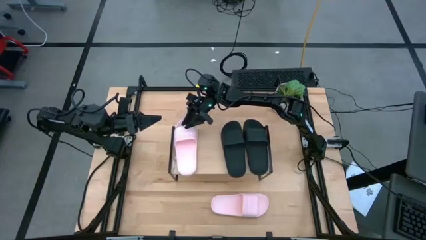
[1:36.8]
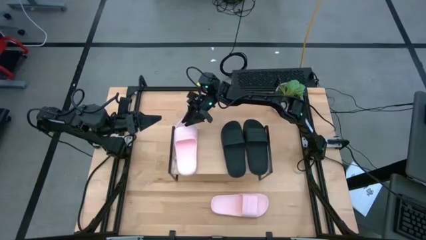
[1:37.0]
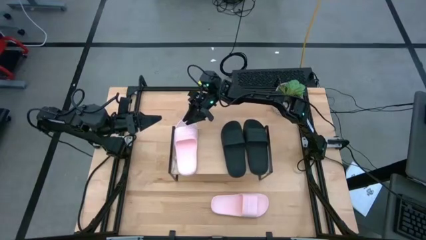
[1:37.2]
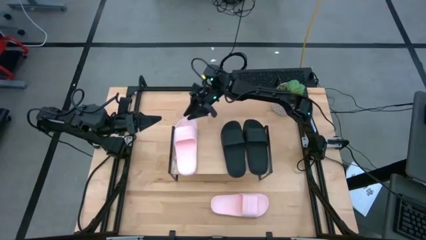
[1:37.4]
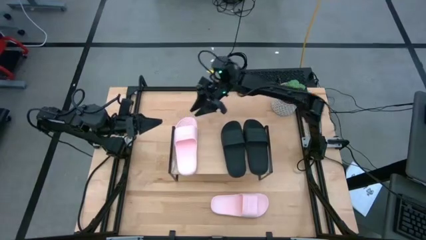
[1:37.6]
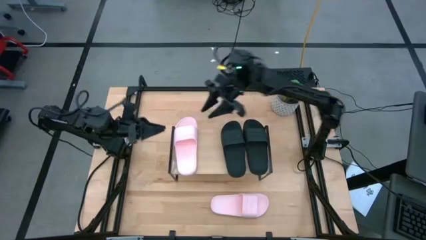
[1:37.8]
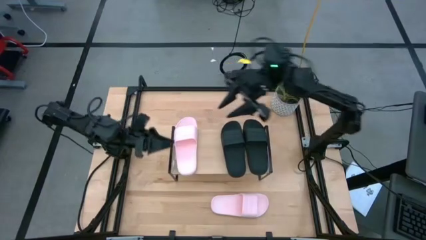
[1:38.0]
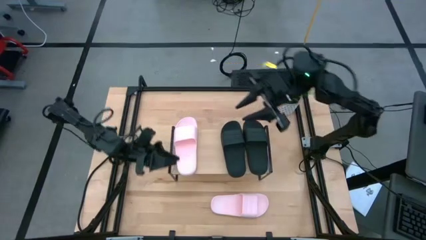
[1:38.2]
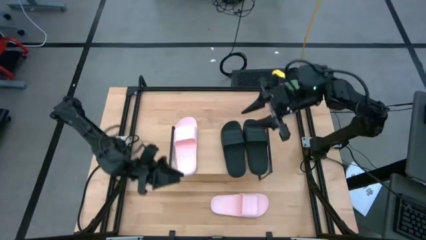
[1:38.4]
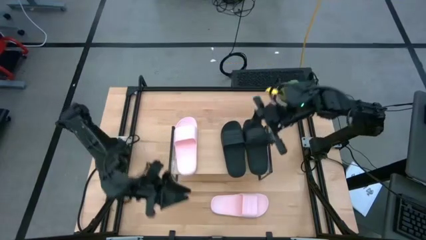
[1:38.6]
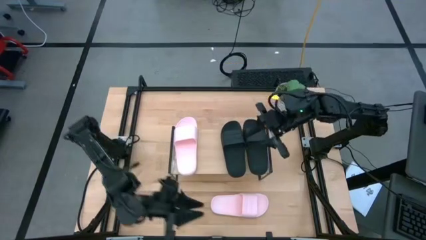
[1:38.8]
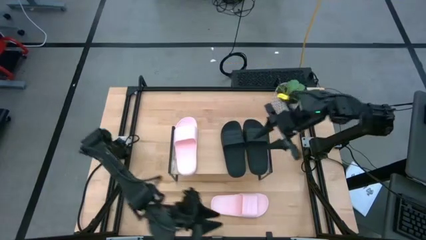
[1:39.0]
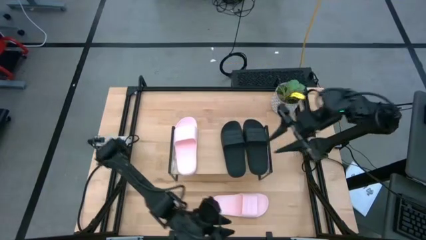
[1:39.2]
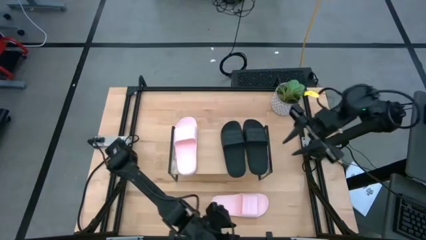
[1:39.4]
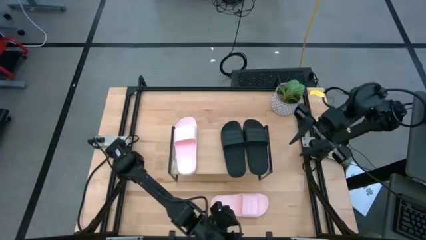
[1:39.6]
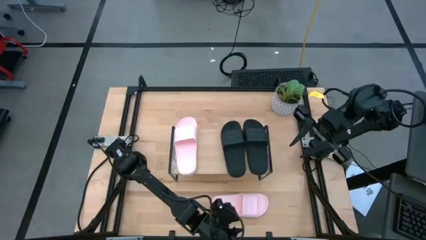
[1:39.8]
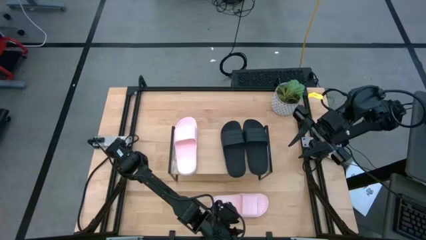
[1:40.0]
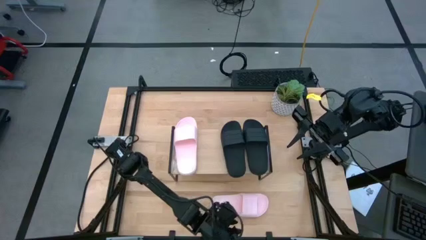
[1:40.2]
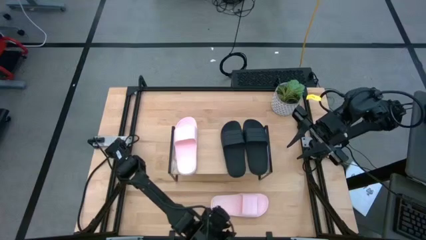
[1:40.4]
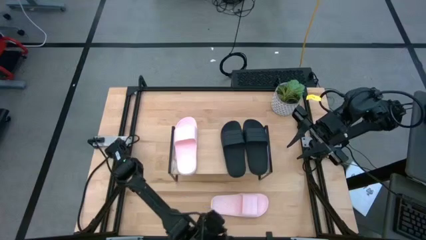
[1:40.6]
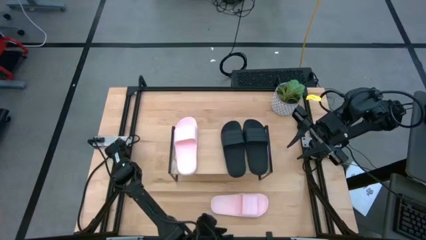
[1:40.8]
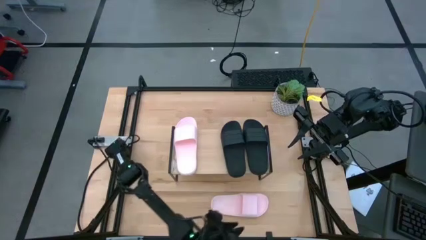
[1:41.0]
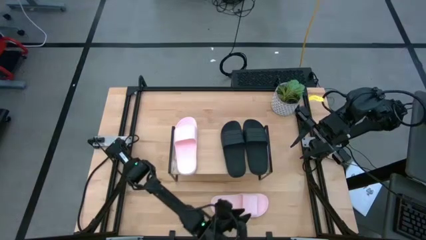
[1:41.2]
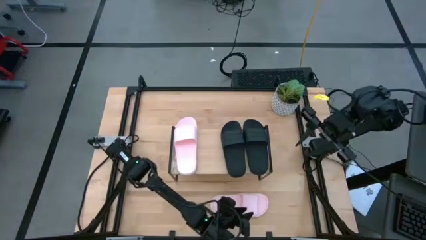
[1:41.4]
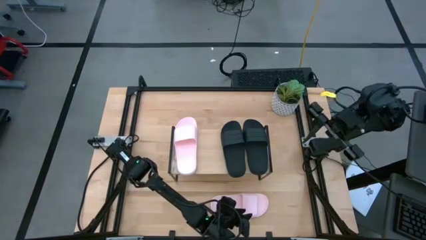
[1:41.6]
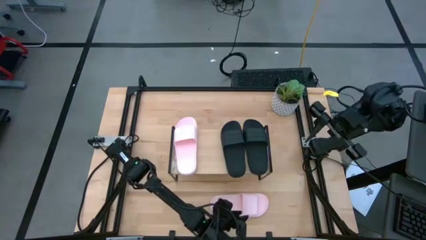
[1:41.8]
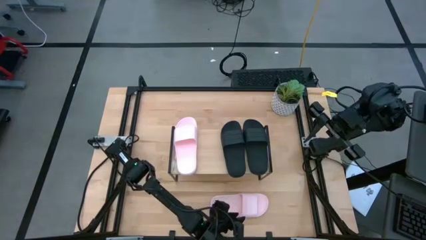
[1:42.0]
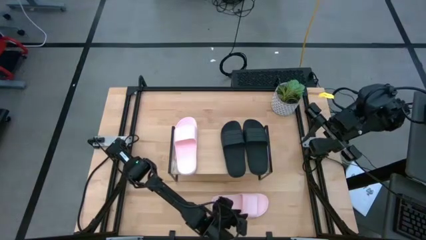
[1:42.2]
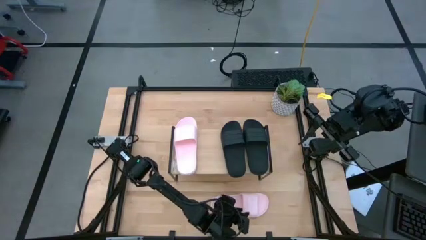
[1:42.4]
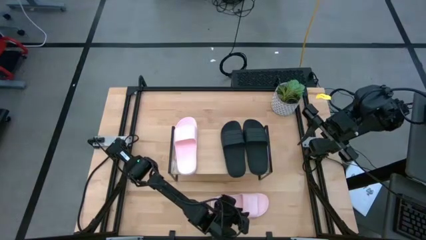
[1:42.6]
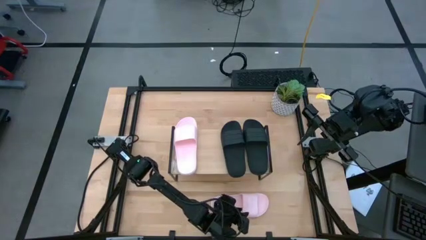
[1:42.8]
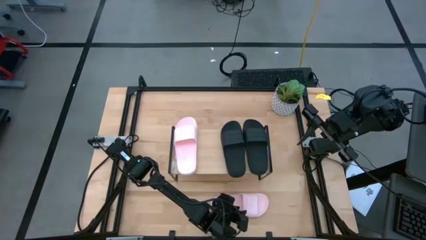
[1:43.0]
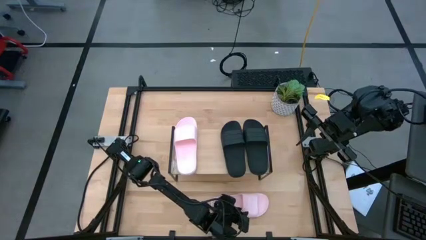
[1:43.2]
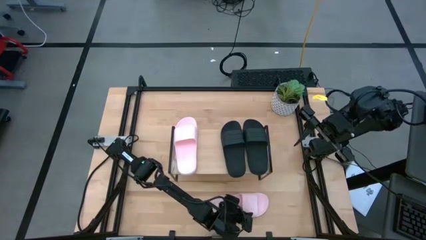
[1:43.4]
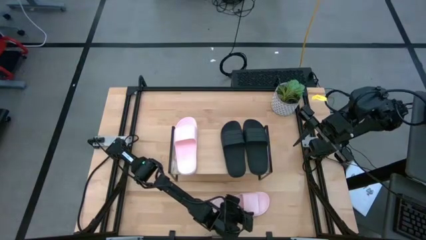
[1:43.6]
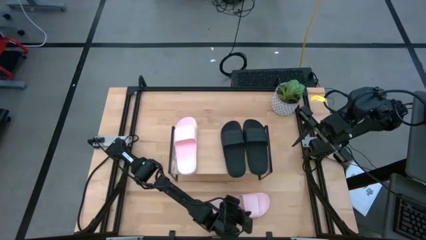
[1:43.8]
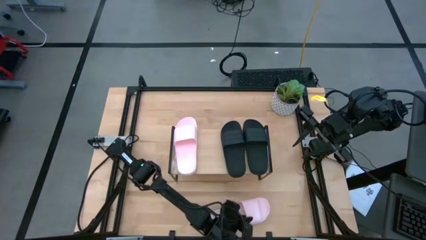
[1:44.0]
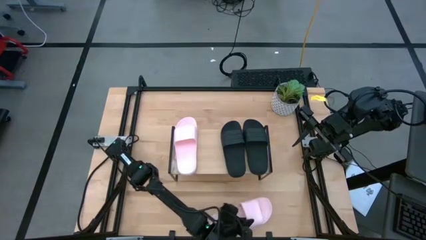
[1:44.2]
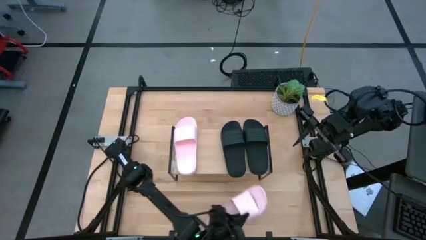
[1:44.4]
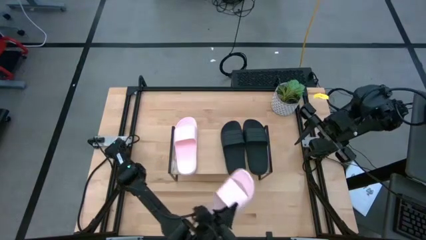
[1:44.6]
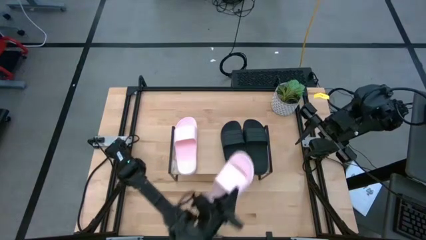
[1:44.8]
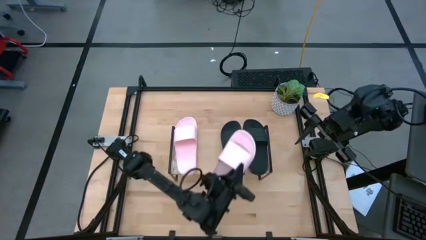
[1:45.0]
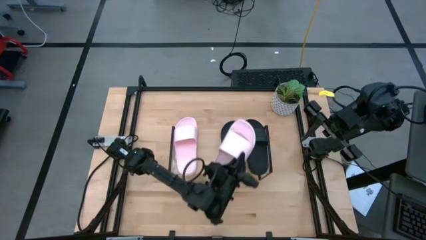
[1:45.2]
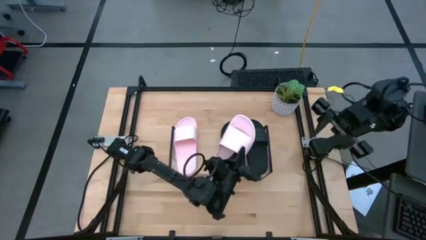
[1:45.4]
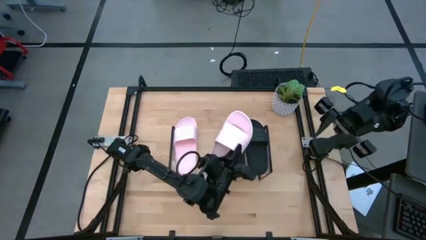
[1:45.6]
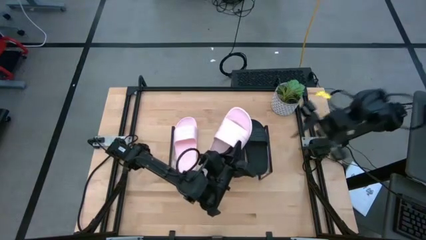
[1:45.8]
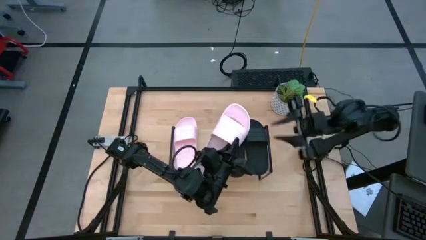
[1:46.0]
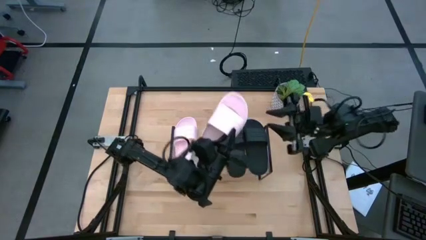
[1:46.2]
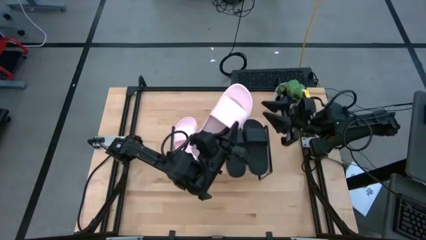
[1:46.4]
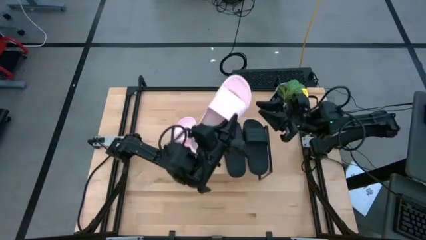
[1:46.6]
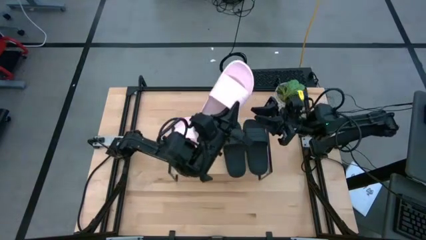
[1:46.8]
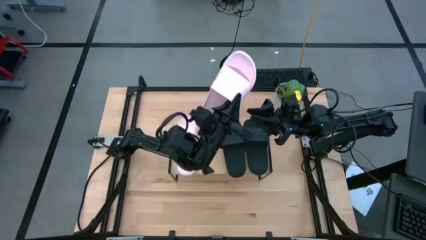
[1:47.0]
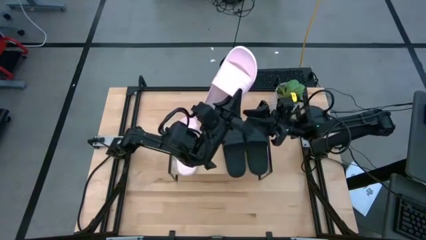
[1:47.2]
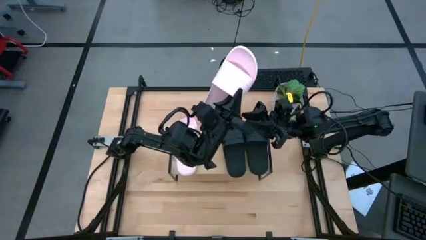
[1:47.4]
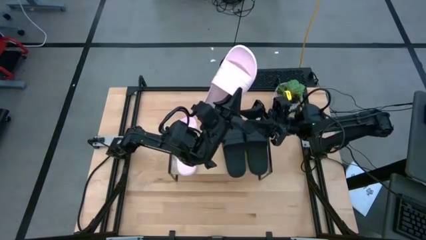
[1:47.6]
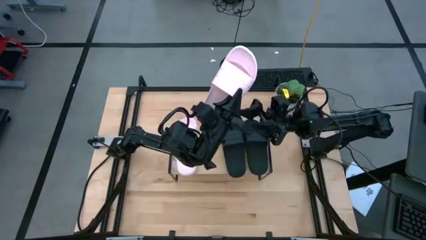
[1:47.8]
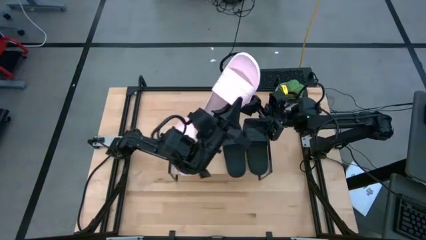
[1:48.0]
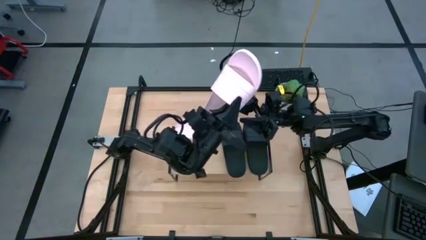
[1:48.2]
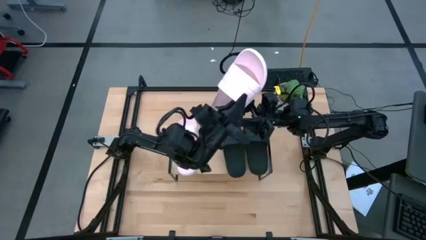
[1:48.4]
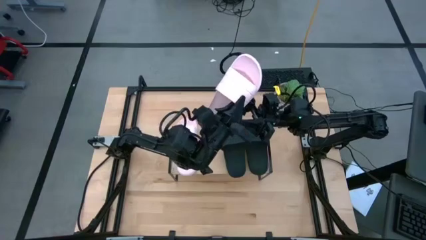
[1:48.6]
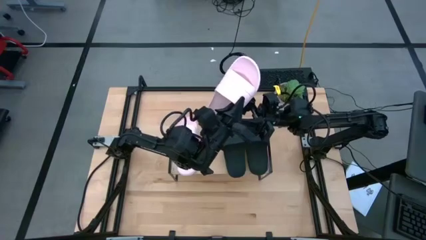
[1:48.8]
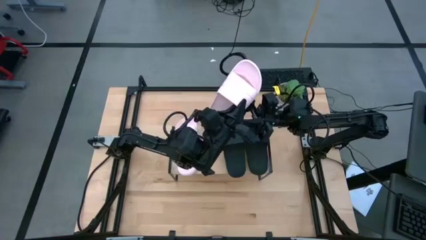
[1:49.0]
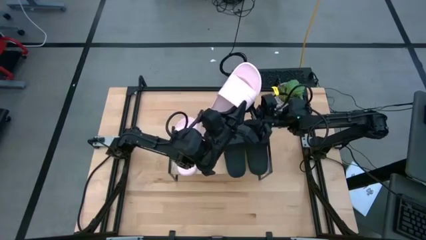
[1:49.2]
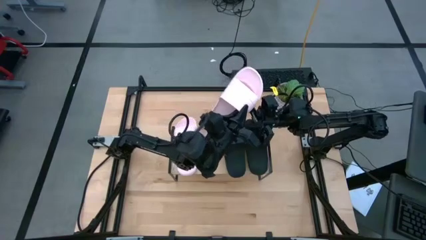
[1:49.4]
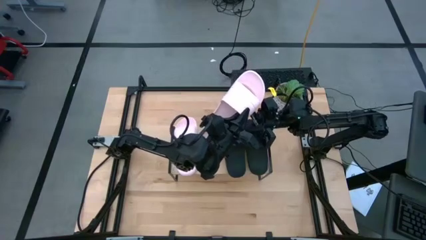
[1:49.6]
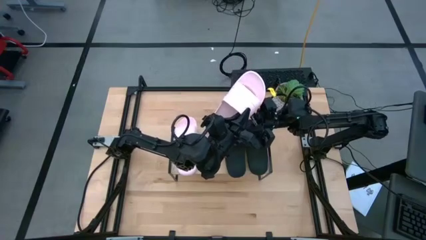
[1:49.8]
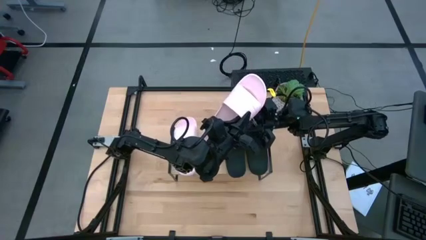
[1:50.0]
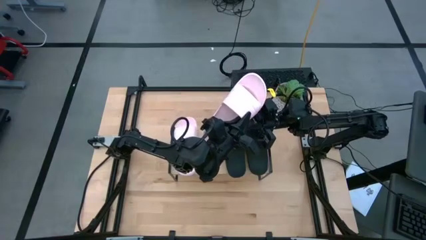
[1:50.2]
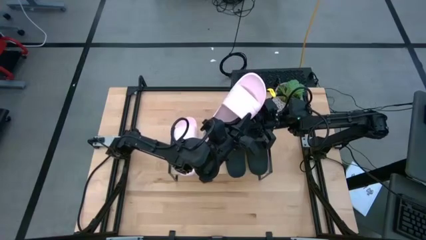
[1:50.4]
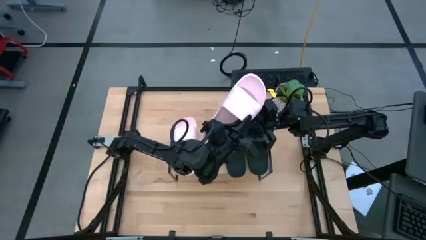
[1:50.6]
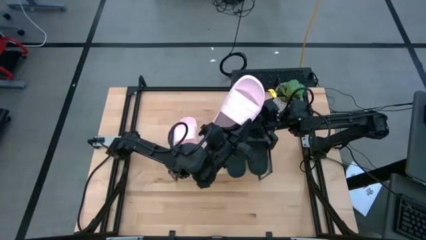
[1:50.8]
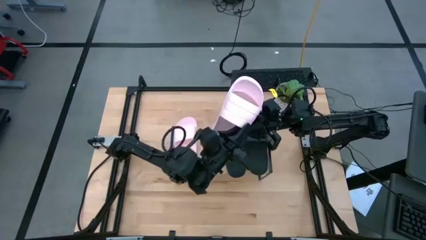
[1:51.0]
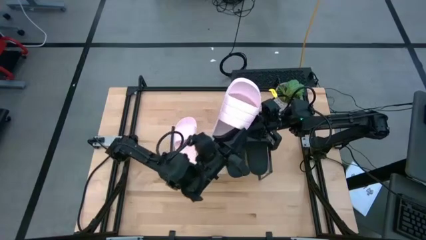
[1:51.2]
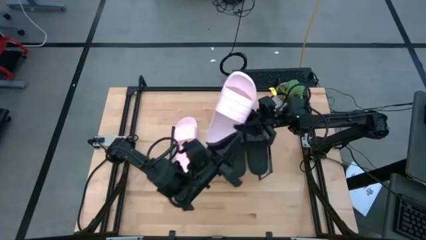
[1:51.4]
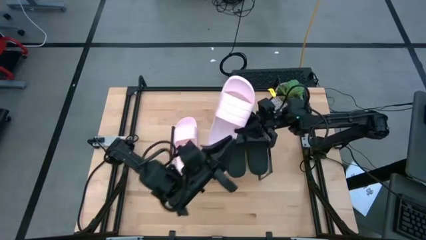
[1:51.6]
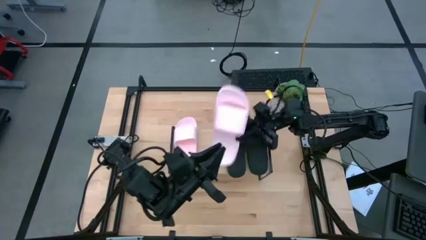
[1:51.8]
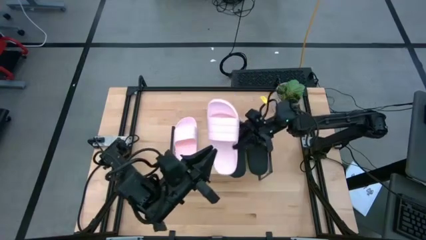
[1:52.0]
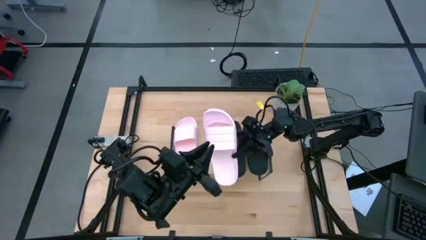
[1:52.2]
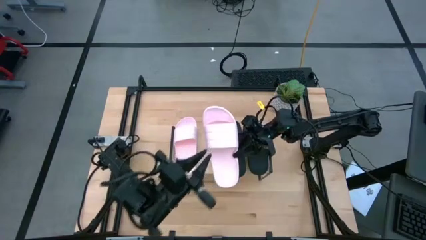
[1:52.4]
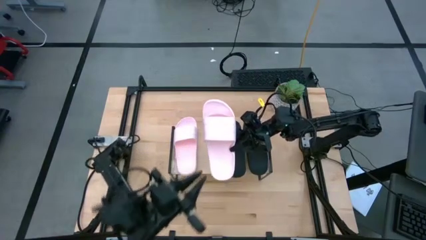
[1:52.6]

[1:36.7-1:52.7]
Task: Pick and place slides into the shelf
Put the pink slipper on the shelf
